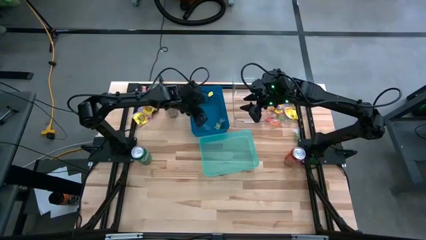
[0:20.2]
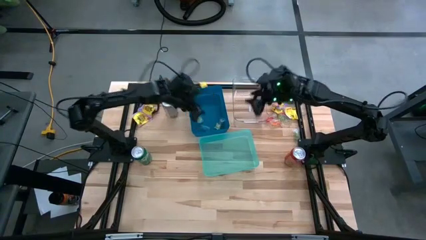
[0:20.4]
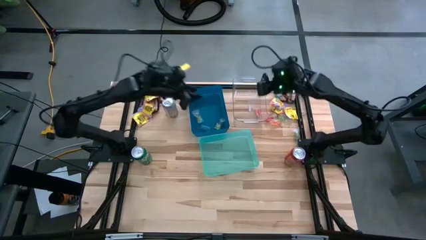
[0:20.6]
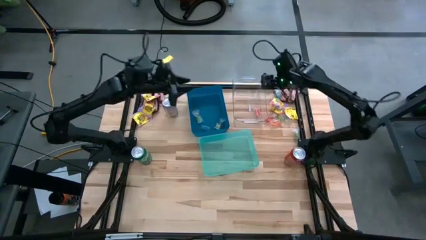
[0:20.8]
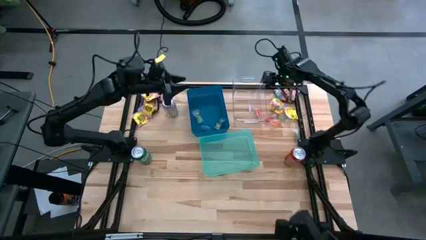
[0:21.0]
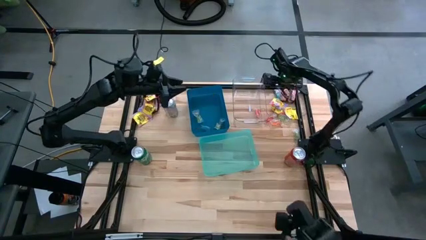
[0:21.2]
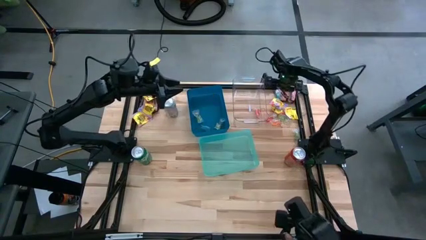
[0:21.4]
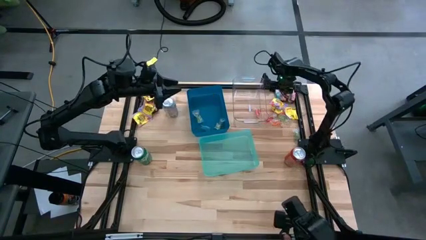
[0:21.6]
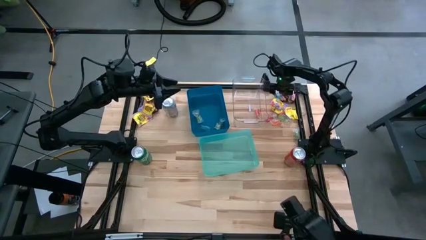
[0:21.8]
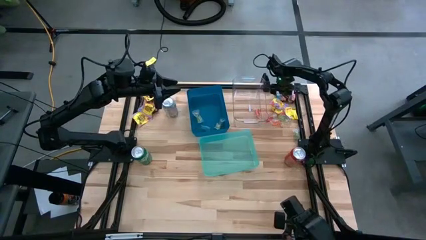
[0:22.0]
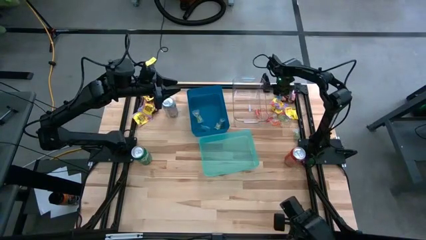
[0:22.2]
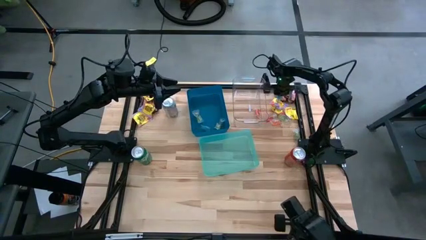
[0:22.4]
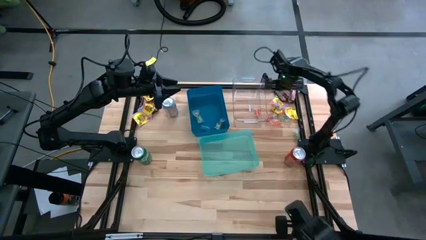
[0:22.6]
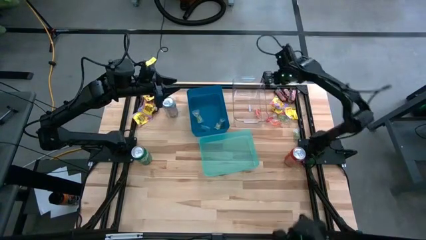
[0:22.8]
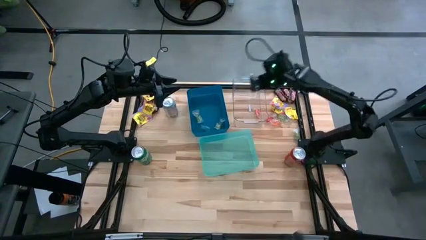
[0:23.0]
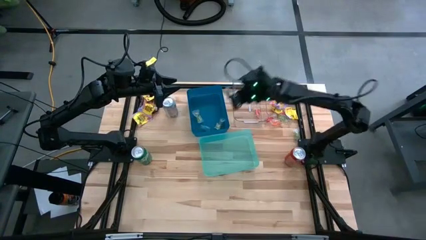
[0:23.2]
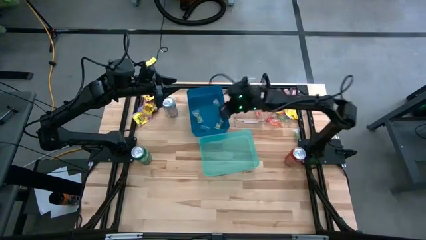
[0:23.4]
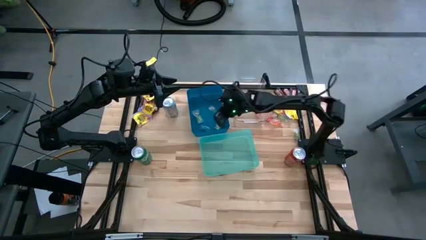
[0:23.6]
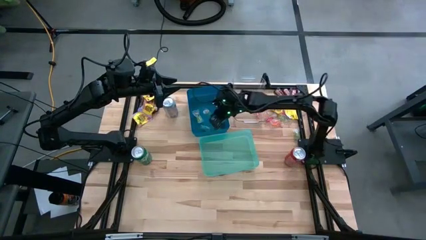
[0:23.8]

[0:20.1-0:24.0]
Task: Sort candy
Put the blue candy into the blue bin

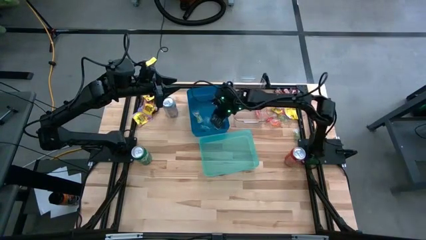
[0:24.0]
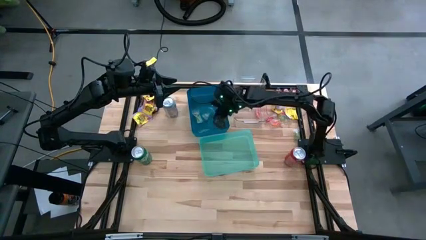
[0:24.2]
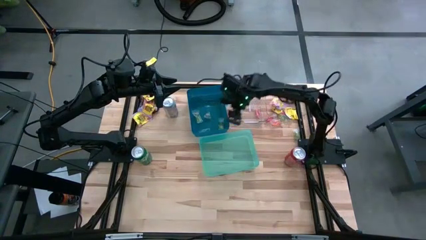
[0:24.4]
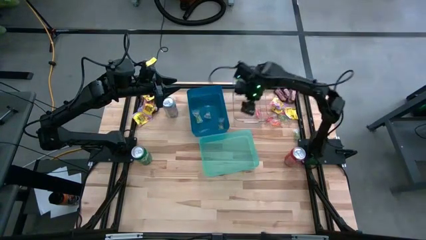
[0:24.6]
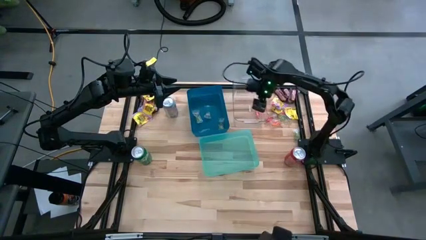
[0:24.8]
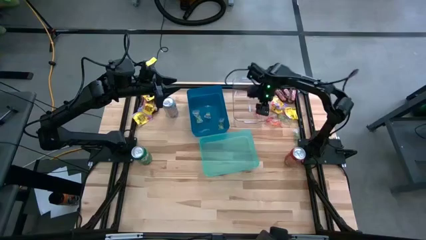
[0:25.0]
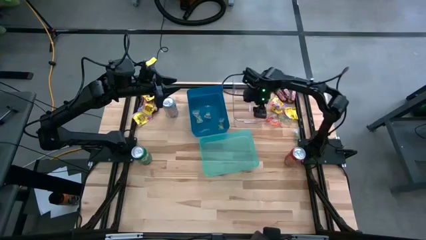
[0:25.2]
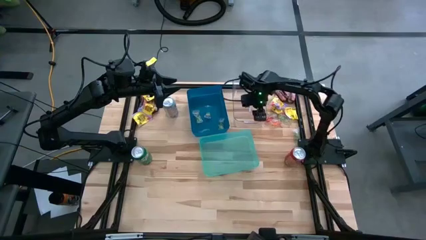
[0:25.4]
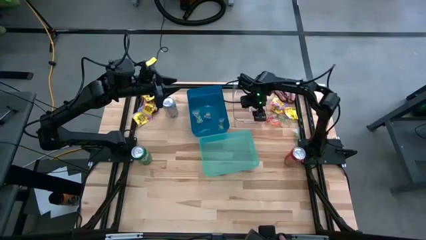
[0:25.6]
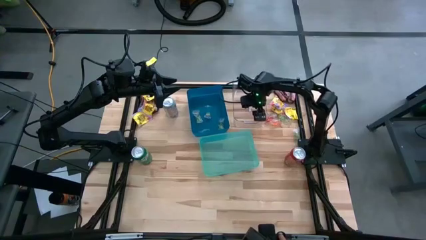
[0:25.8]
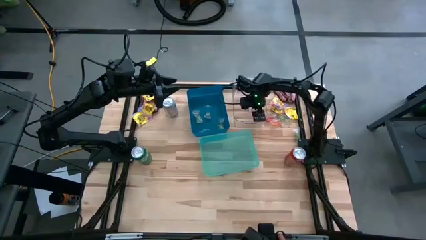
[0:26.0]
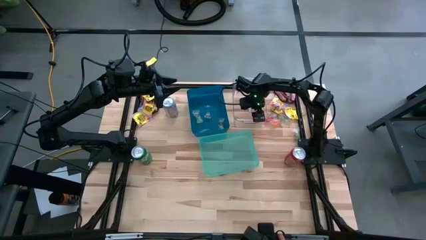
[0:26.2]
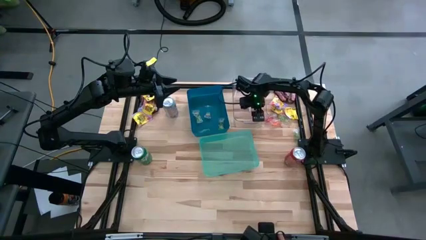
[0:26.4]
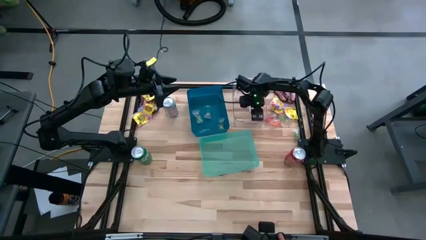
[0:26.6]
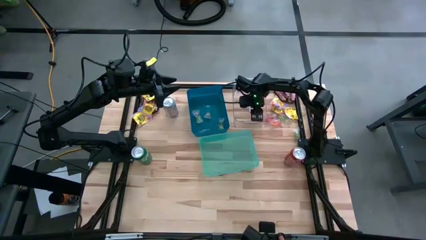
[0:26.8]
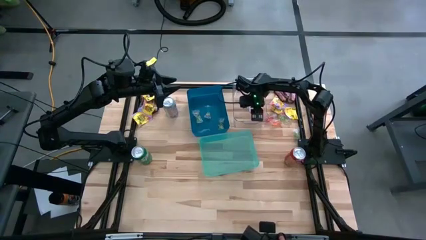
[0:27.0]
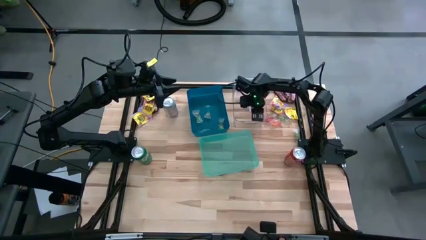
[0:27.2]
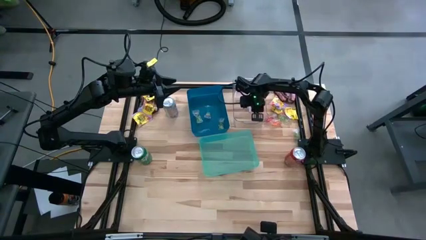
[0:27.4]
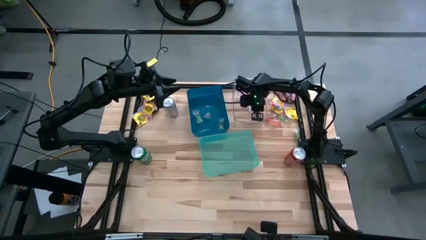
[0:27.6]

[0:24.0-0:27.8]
Put the orange candy into the blue bin

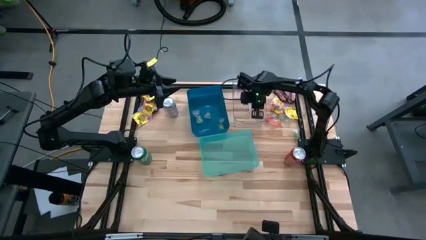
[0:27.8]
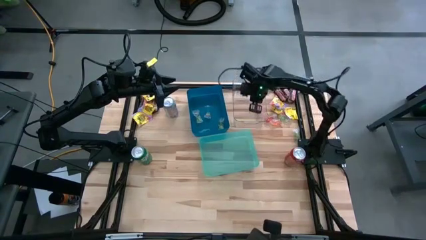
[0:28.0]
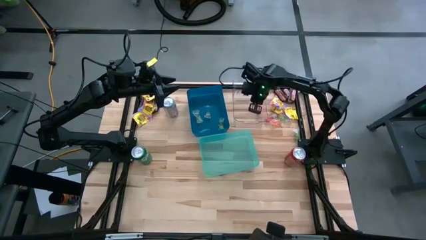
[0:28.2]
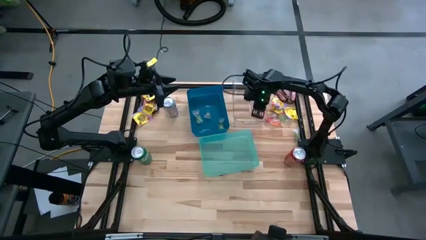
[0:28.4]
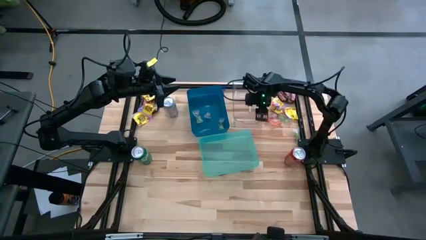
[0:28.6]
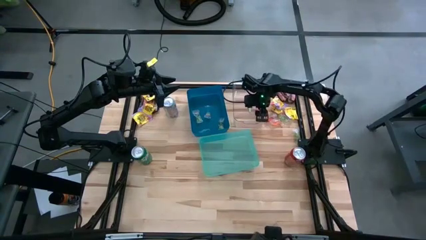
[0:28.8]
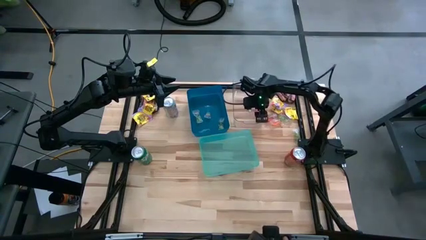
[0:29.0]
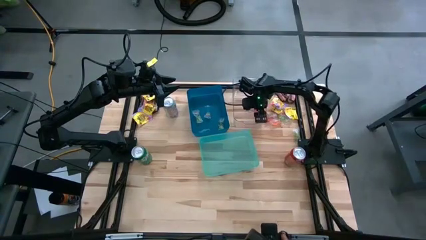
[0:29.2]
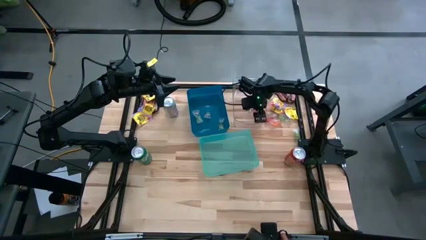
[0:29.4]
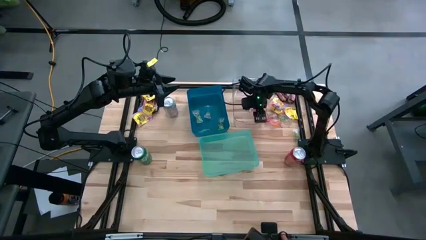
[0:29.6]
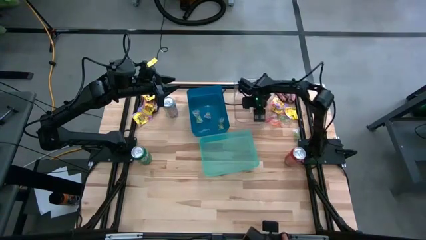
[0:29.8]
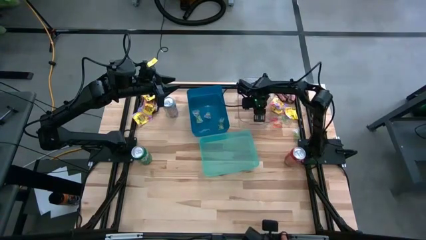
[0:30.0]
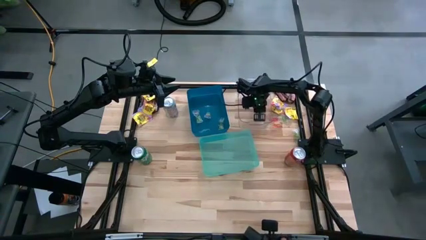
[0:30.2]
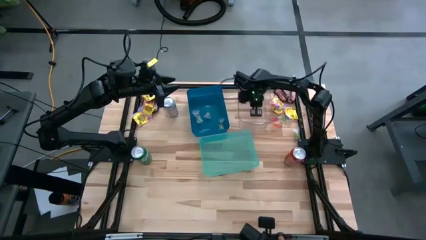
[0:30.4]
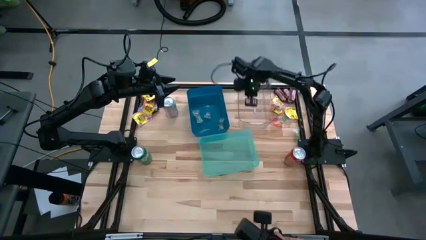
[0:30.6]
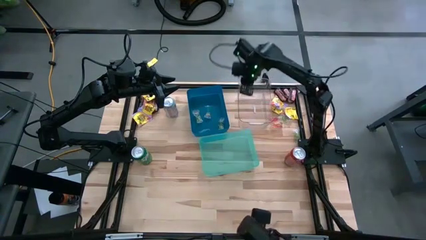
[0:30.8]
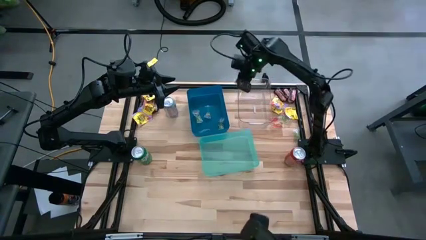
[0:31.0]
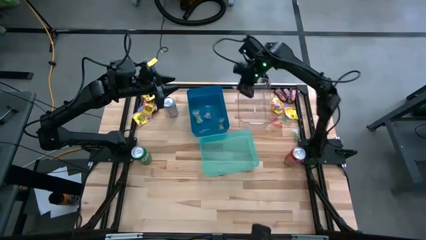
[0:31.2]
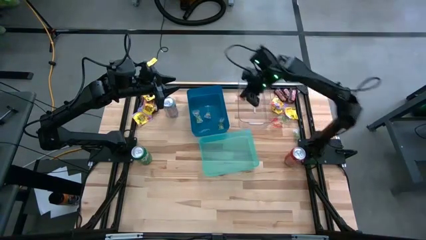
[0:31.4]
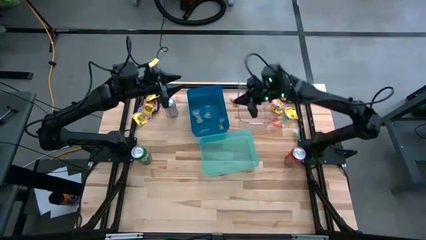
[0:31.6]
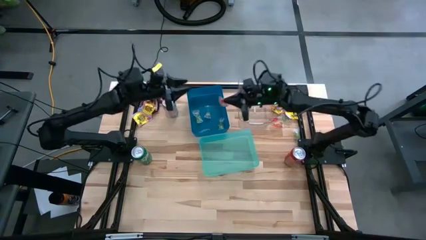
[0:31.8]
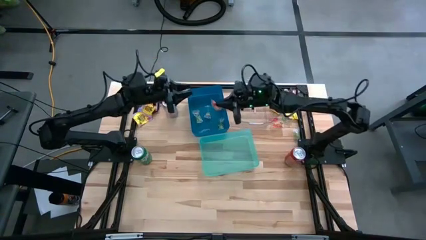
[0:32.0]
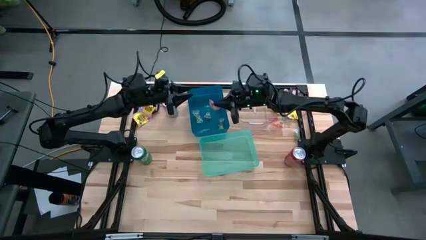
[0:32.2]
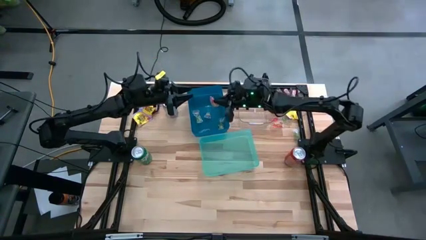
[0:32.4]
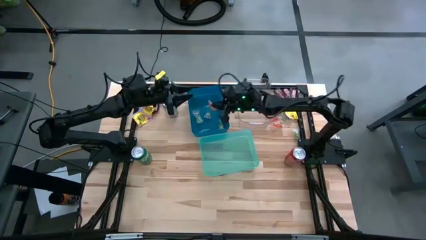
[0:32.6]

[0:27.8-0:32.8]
Put the orange candy into the blue bin

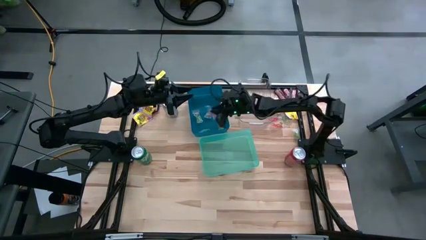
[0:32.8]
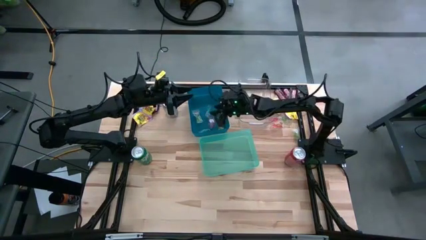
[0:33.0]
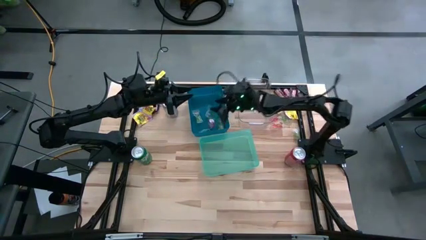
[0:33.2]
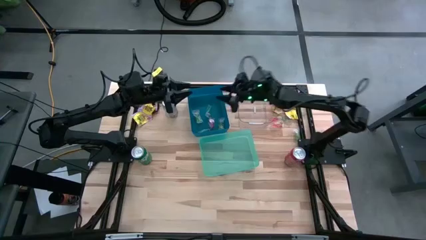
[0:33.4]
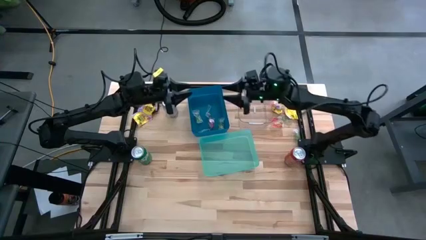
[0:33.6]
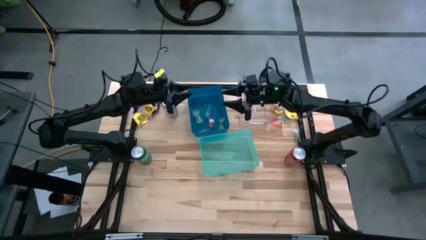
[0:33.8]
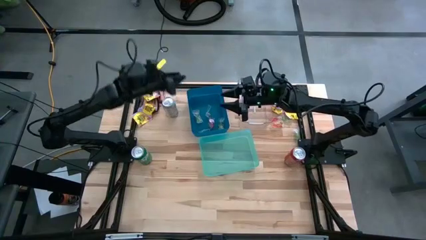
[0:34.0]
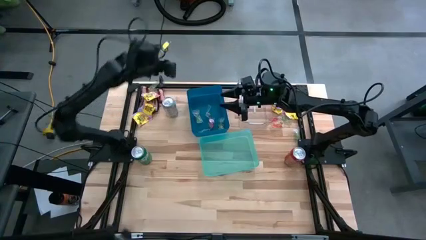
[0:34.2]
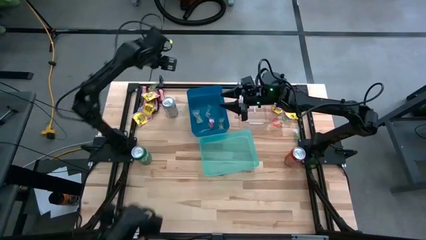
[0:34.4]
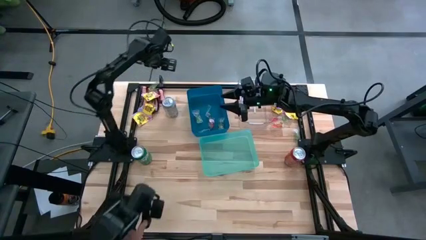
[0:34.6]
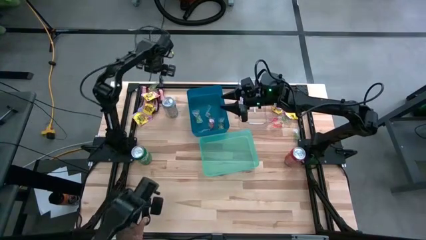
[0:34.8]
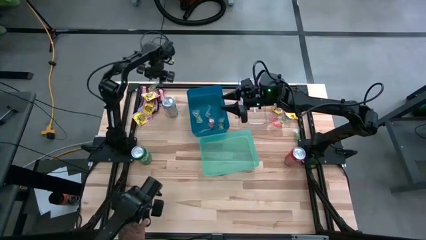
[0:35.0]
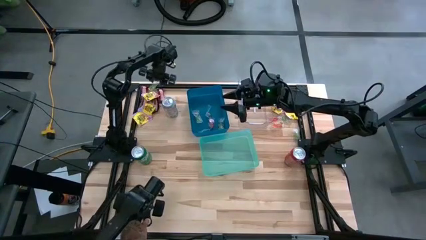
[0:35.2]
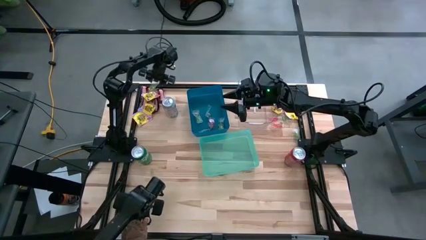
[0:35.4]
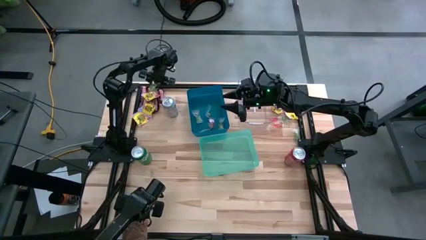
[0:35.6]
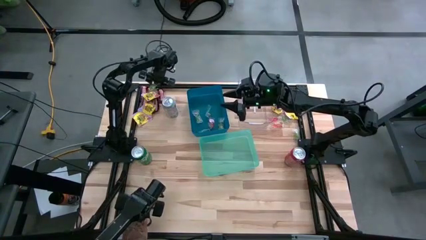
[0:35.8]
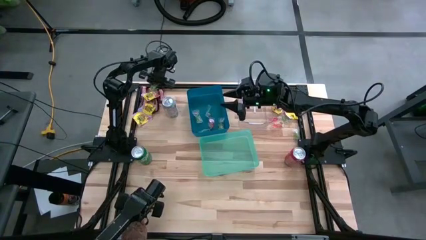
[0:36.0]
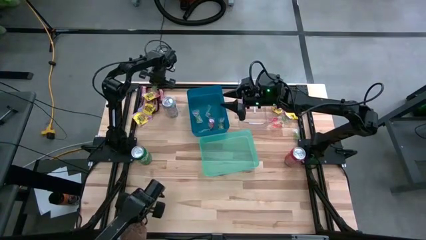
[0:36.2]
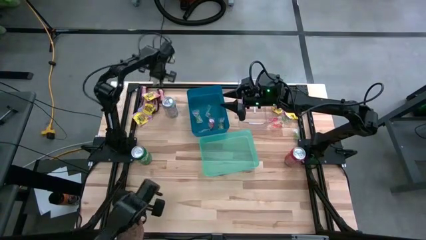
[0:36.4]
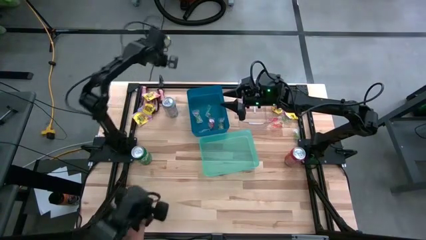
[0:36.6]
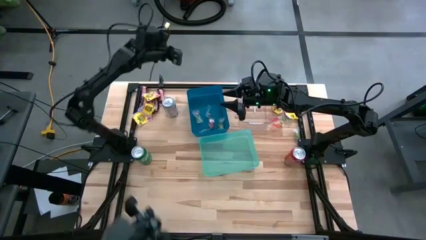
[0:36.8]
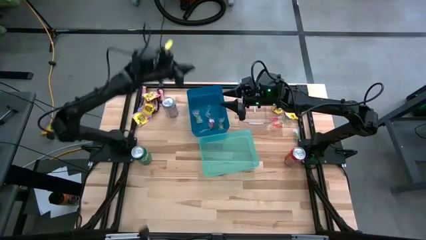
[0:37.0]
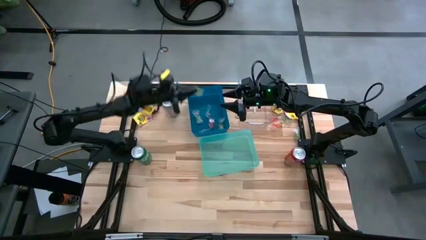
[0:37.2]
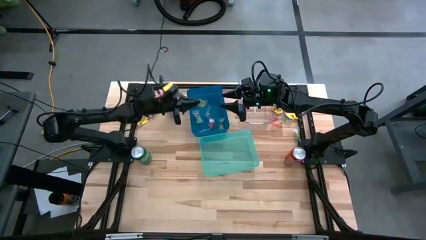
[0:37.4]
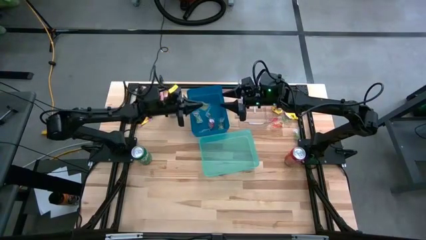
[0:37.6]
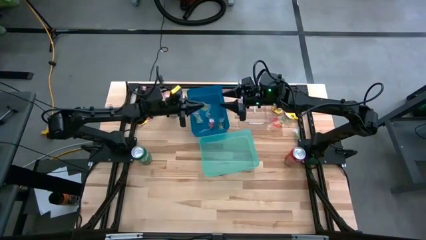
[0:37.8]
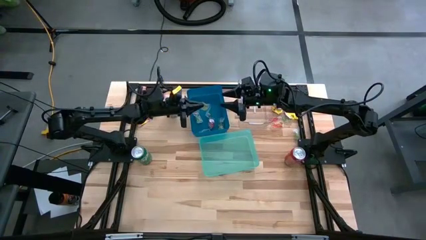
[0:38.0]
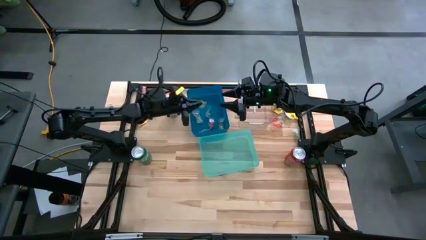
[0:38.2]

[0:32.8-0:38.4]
Put the green candy into the blue bin
